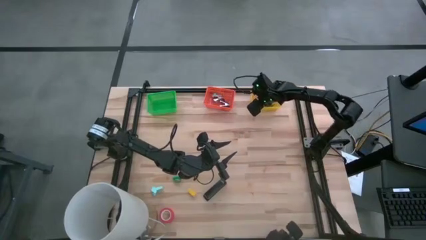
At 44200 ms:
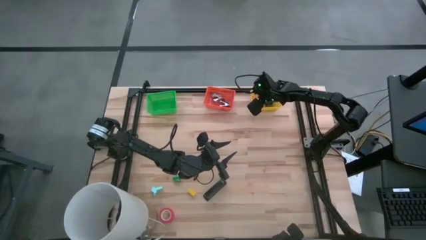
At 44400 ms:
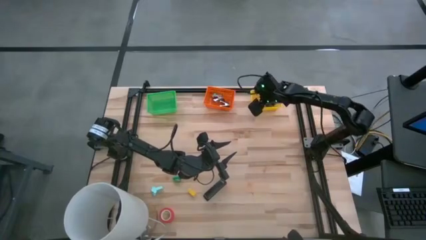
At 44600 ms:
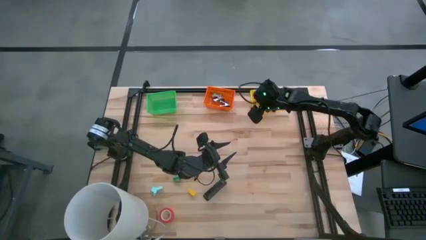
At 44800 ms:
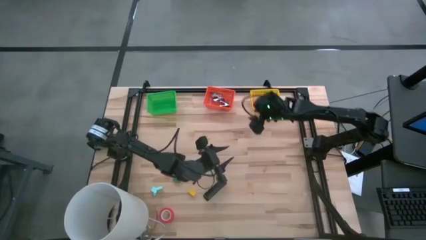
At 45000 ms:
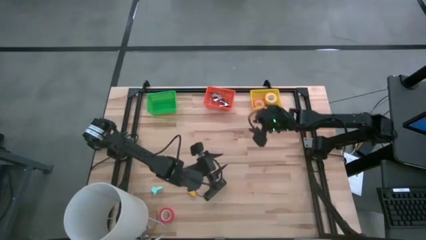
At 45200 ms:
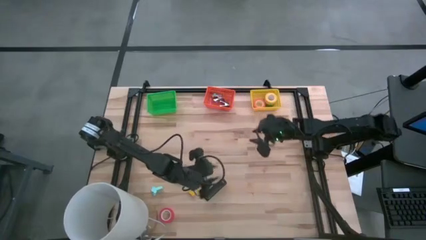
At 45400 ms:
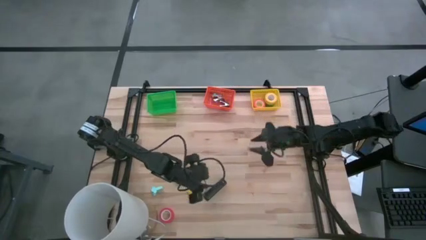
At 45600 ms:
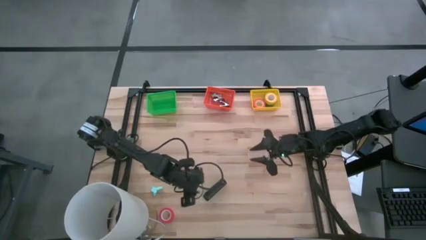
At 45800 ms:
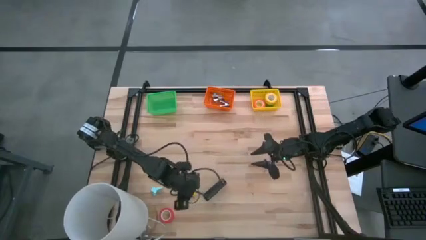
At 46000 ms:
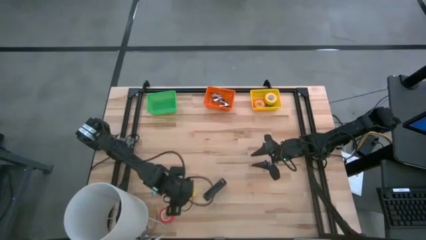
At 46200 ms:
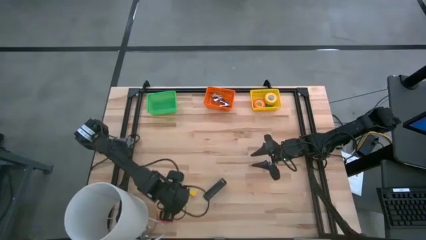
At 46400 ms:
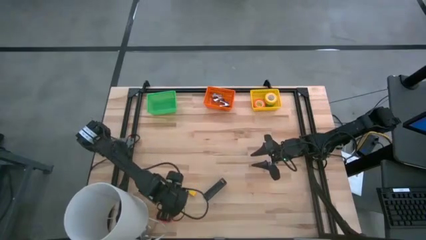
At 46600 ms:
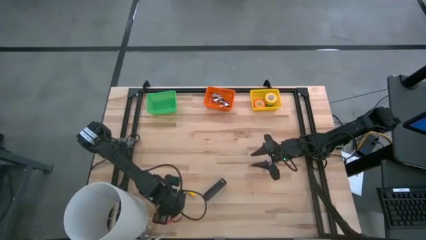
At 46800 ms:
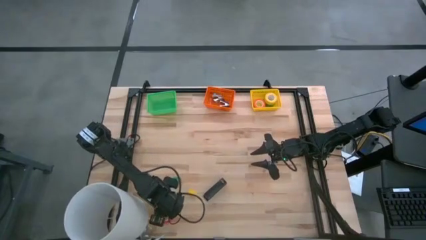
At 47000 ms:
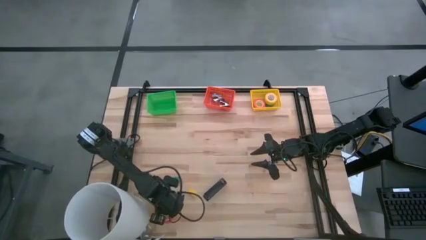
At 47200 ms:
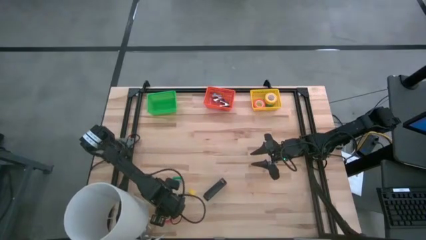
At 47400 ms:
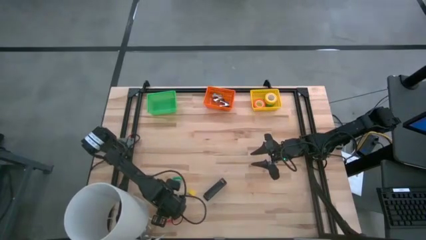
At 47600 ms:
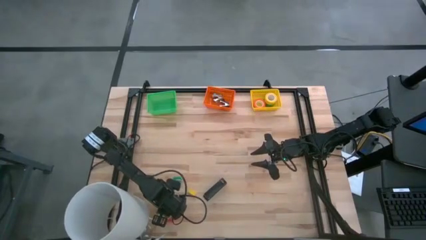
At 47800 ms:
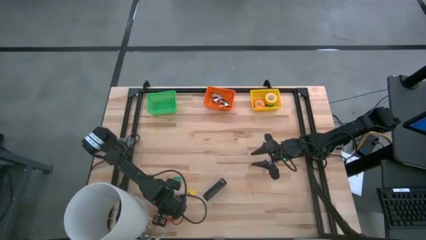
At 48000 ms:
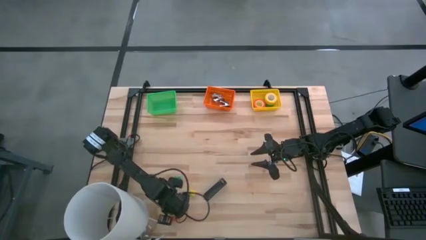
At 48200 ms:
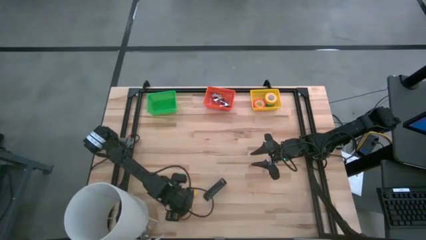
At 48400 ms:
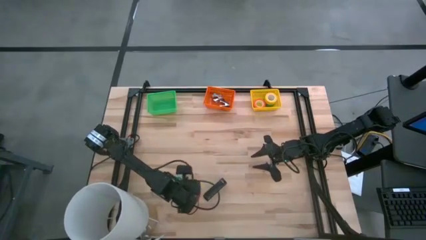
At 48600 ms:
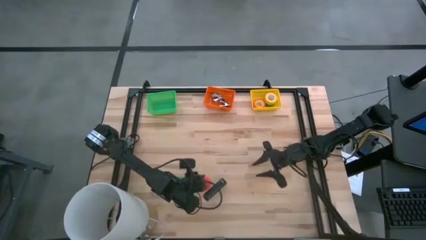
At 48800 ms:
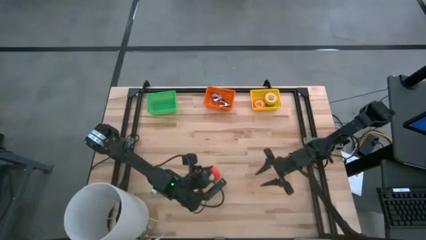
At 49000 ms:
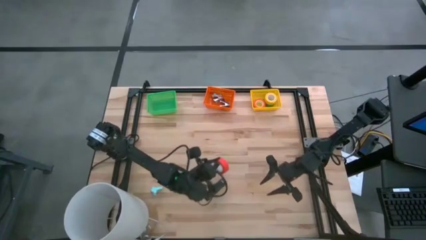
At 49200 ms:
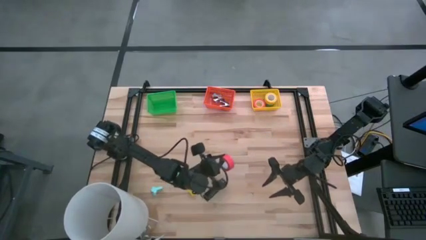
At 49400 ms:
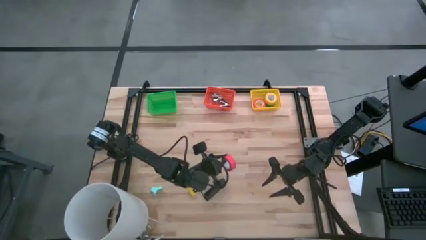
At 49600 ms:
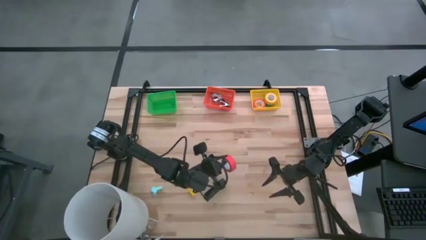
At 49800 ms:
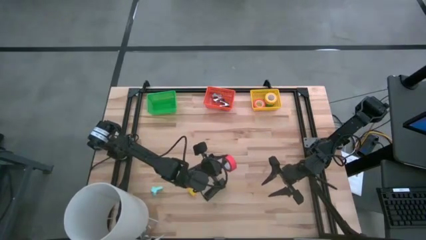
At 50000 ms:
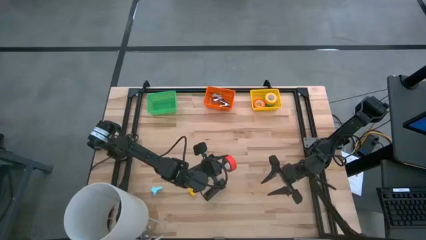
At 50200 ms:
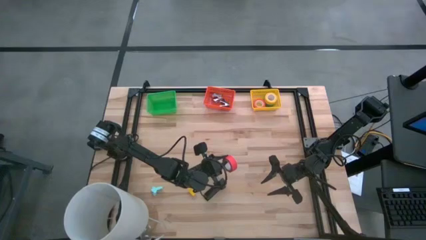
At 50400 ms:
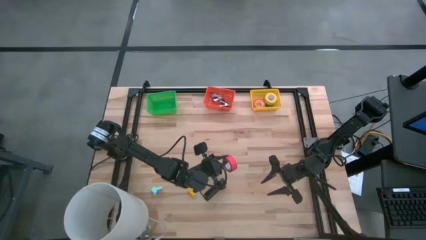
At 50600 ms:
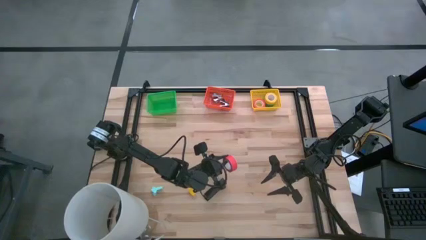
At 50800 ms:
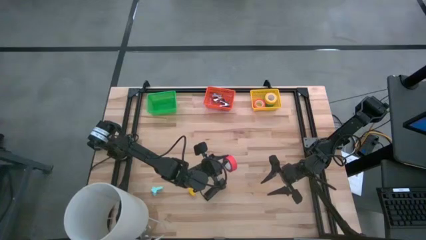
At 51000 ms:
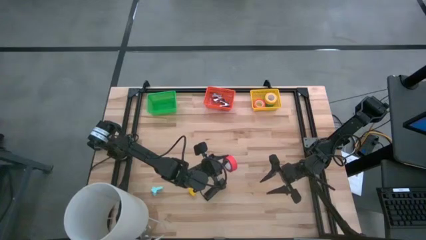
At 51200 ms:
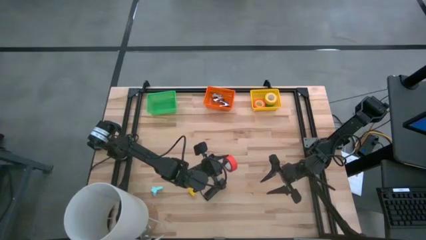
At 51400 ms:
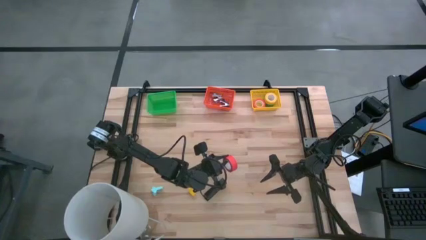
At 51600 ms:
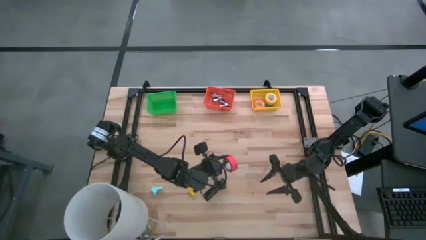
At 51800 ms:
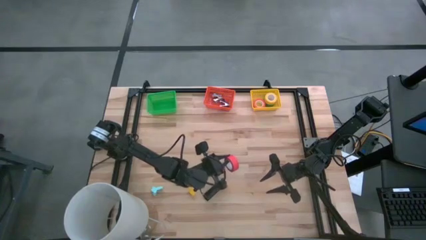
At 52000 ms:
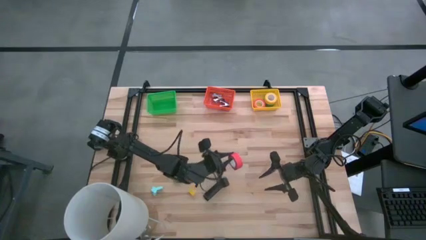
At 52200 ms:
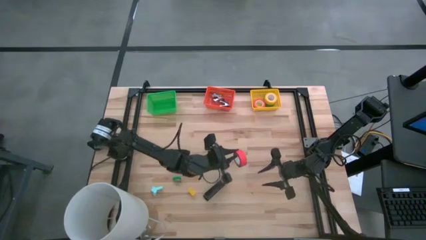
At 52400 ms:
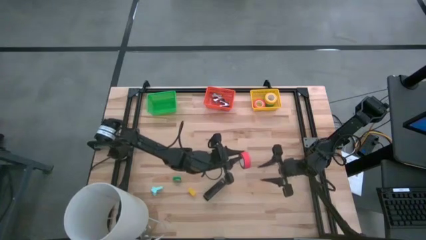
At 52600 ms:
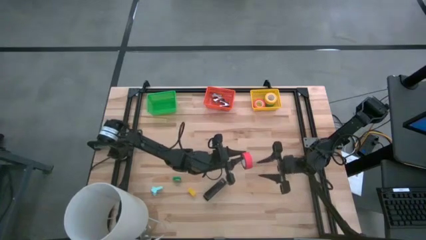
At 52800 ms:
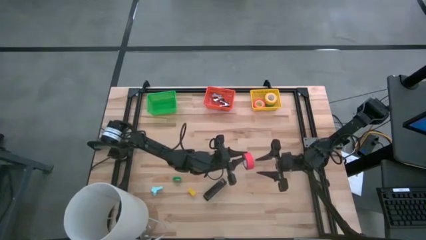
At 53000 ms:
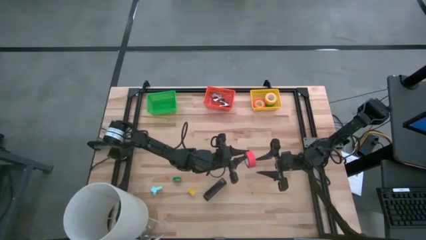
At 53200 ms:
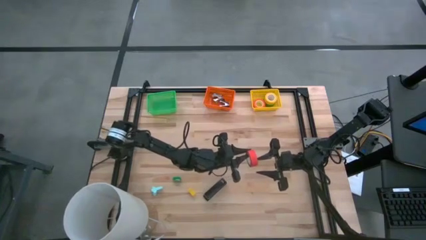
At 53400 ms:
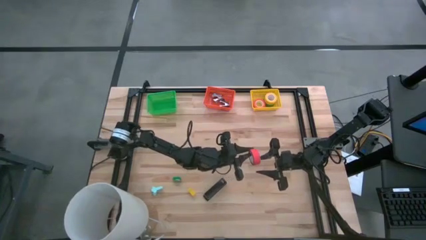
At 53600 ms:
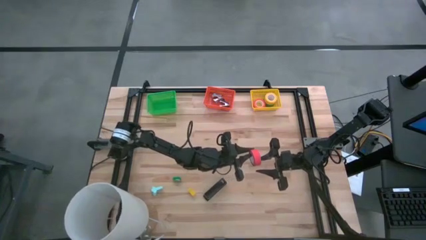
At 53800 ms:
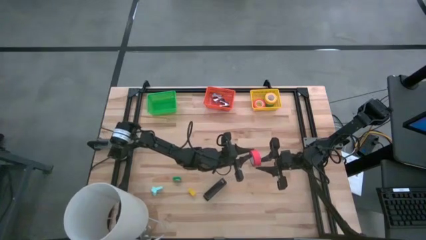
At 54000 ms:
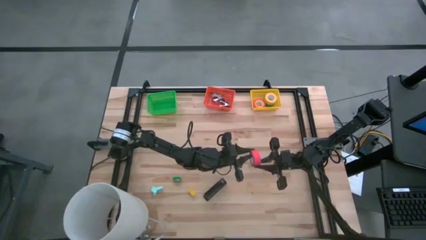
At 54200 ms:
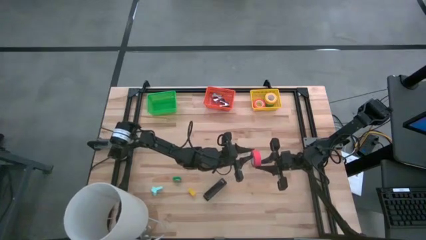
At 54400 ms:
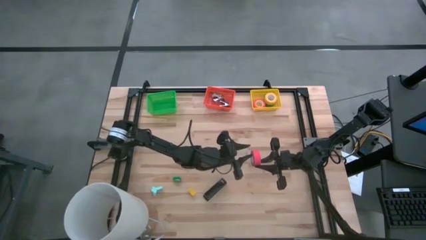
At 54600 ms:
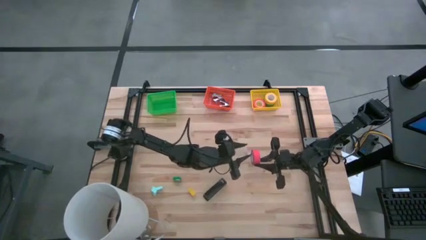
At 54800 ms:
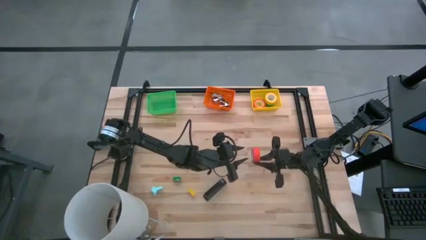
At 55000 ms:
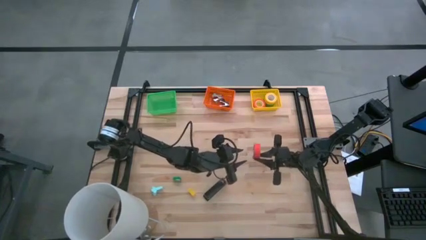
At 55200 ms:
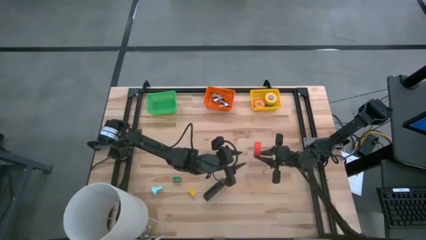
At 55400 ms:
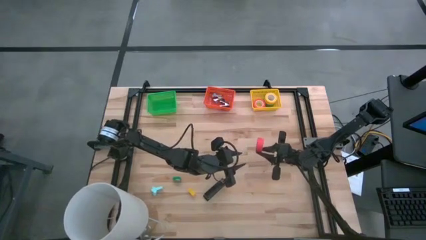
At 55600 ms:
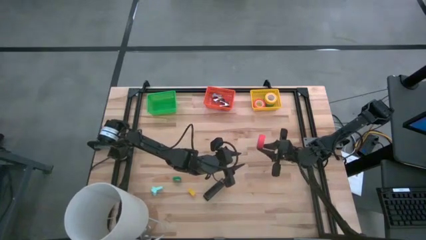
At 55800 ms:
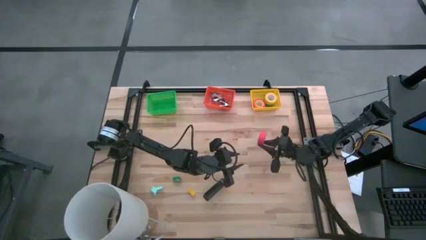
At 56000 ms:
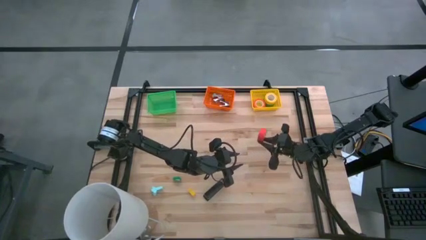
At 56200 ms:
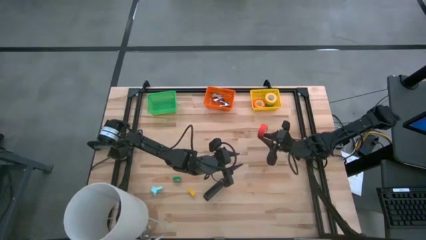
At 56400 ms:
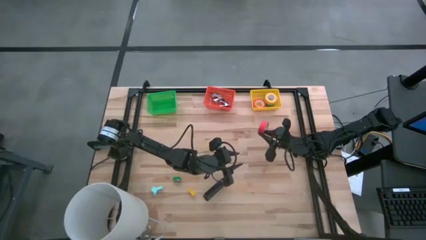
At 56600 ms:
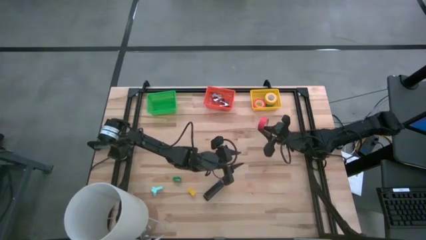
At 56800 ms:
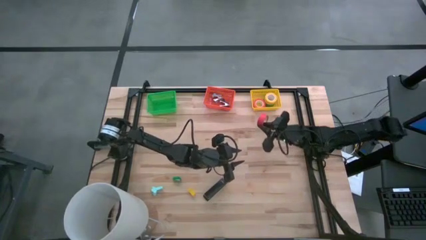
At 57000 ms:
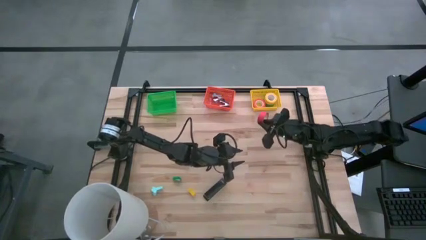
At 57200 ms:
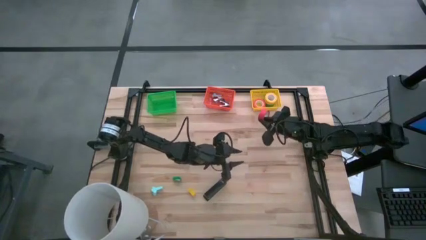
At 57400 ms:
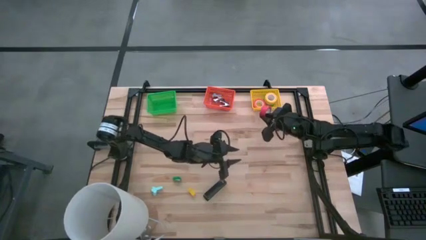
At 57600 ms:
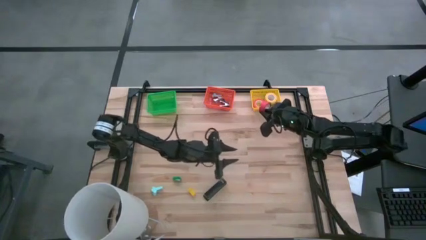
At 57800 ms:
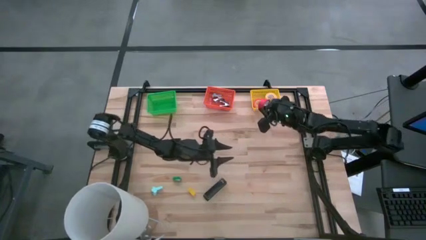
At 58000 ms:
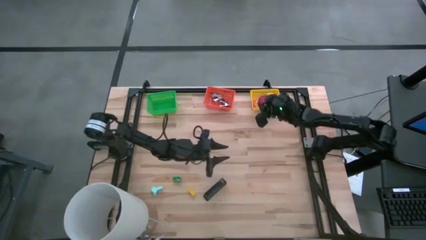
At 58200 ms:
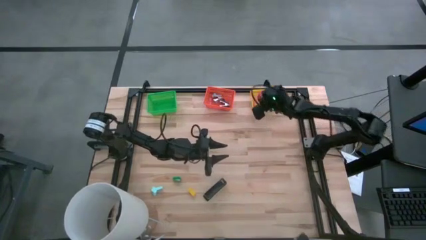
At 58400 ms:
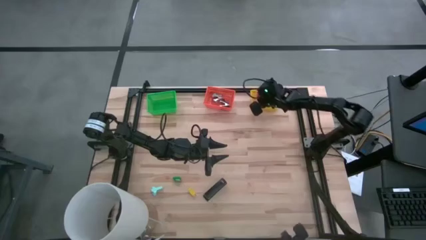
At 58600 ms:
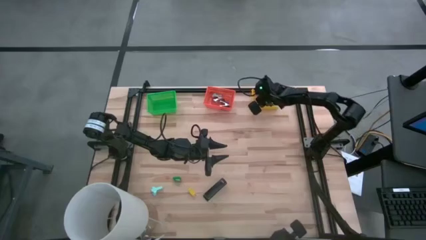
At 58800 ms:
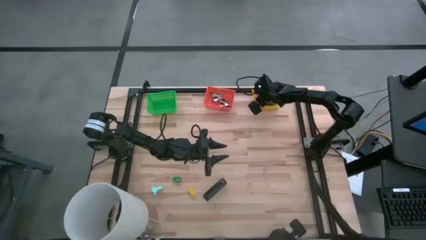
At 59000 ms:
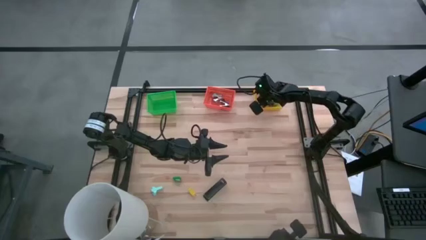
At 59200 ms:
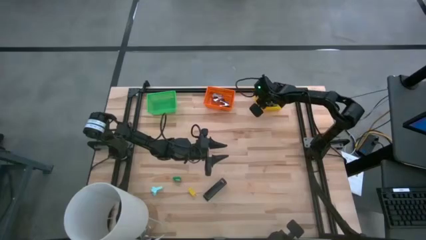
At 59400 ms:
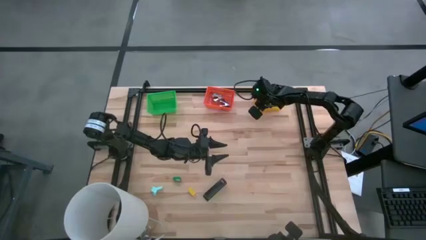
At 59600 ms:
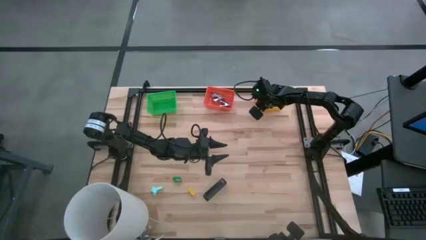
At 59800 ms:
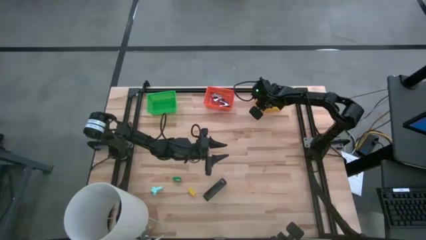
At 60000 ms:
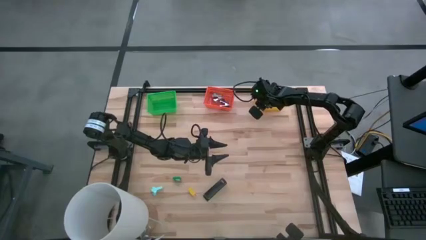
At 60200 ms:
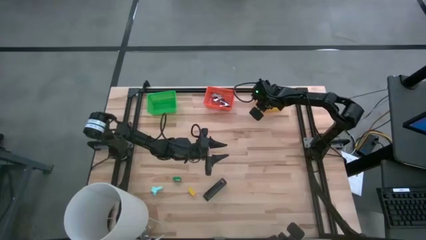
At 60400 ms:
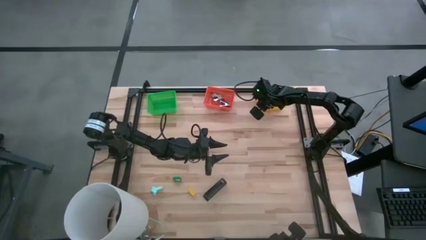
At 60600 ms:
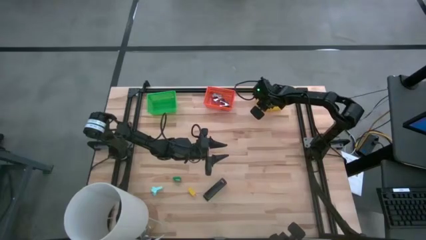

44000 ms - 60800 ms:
Task: Pick and place Stapler, Stapler remover, tape
Put the red tape into the yellow bin
